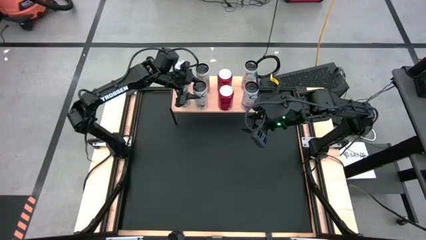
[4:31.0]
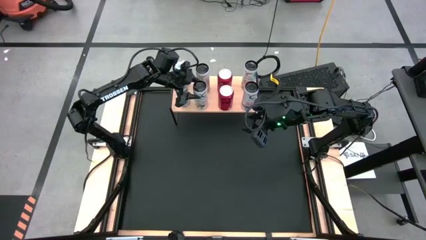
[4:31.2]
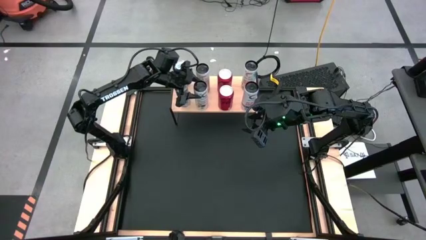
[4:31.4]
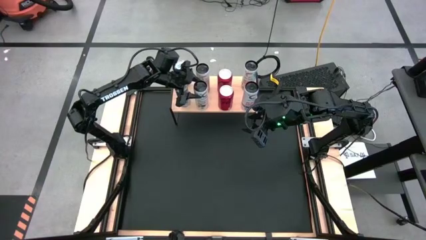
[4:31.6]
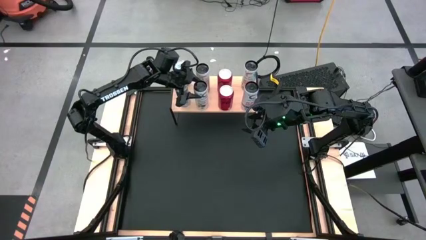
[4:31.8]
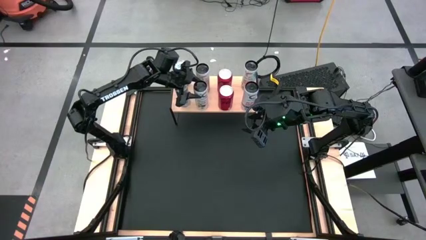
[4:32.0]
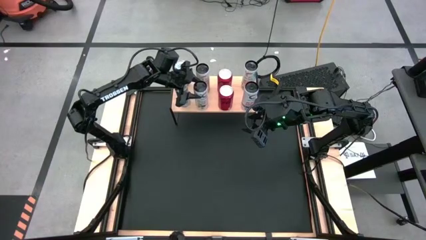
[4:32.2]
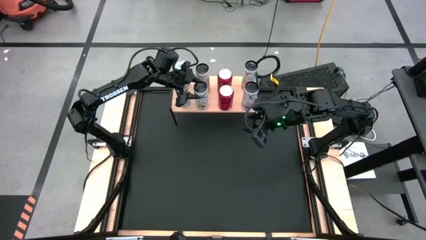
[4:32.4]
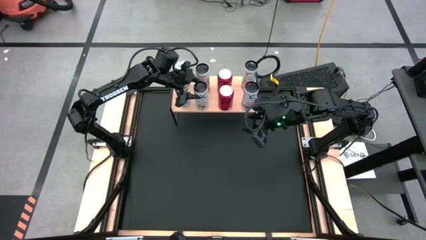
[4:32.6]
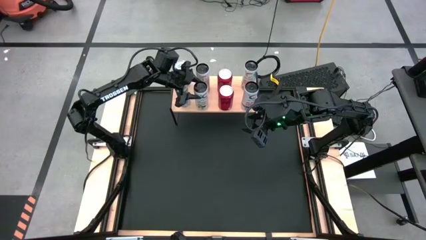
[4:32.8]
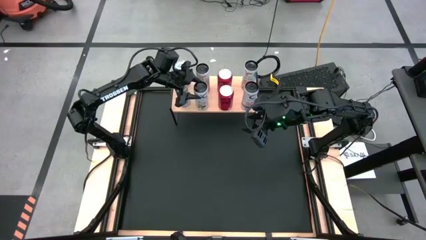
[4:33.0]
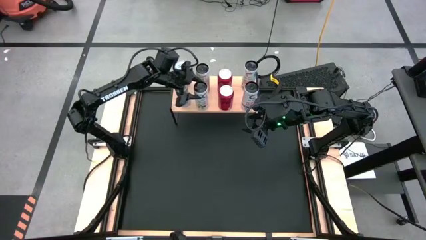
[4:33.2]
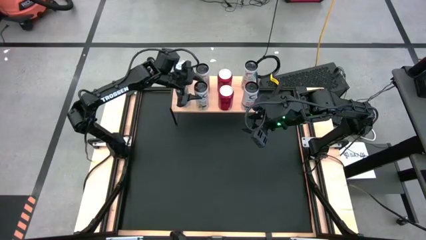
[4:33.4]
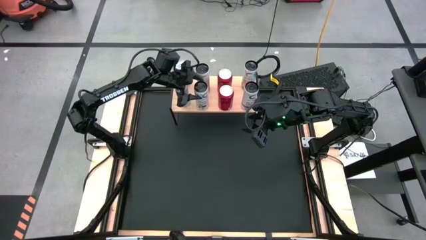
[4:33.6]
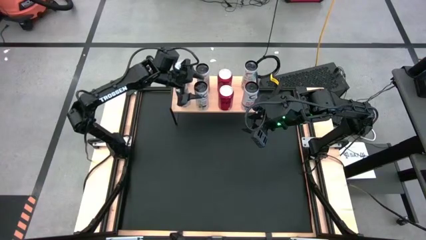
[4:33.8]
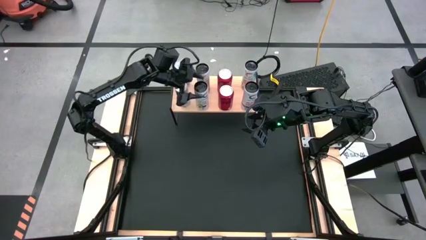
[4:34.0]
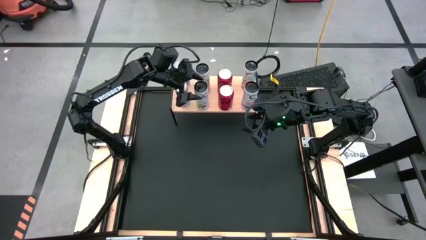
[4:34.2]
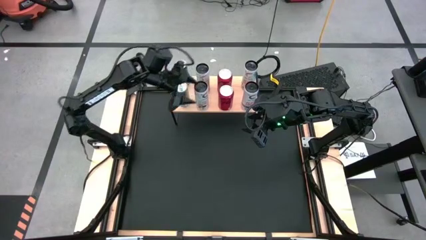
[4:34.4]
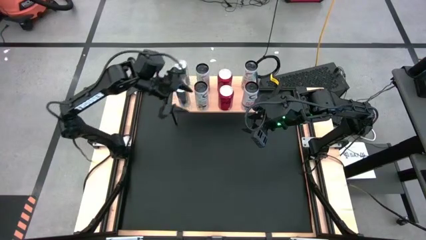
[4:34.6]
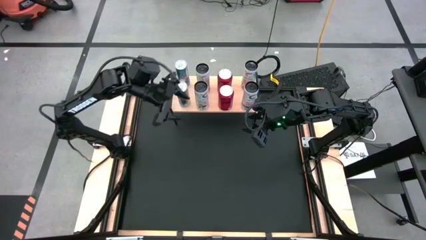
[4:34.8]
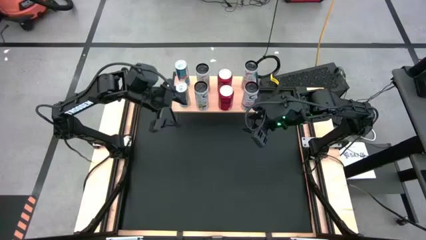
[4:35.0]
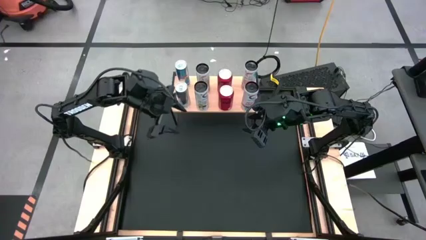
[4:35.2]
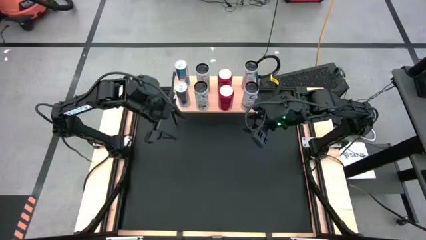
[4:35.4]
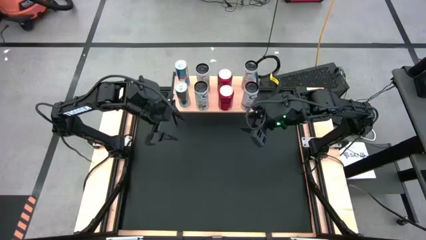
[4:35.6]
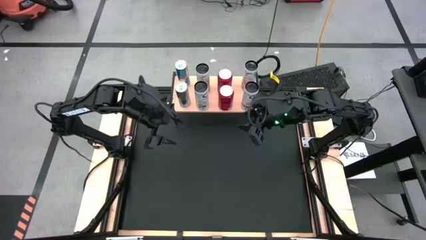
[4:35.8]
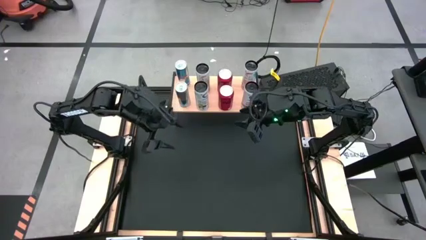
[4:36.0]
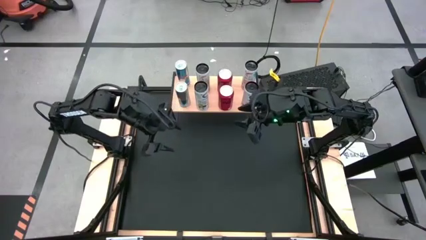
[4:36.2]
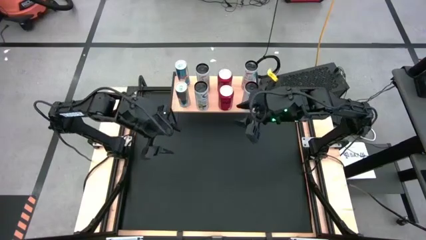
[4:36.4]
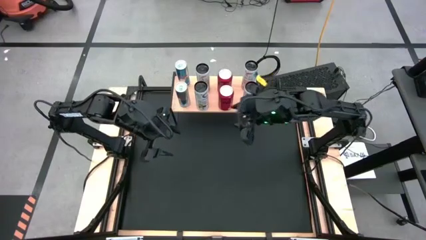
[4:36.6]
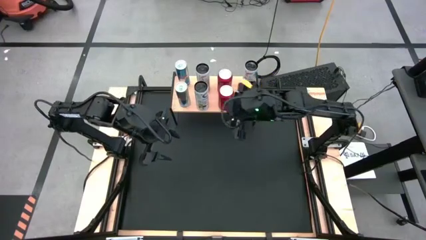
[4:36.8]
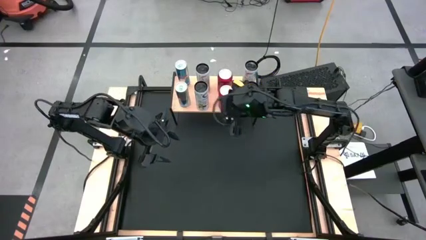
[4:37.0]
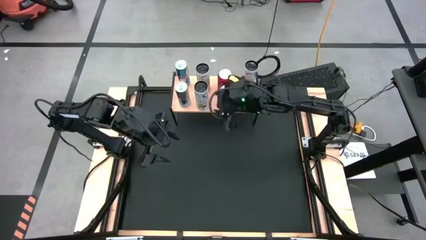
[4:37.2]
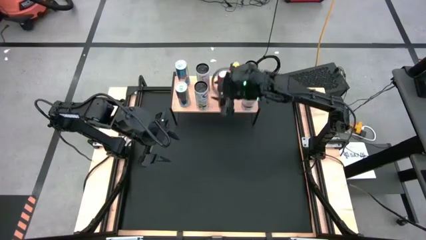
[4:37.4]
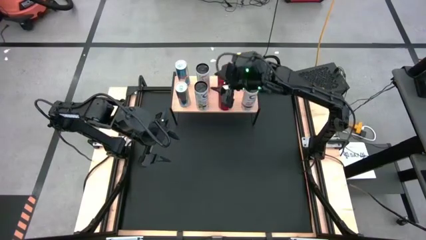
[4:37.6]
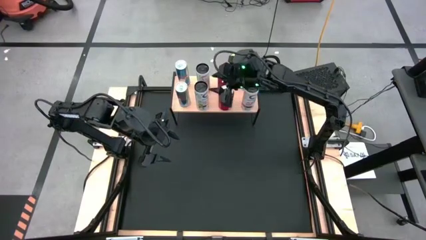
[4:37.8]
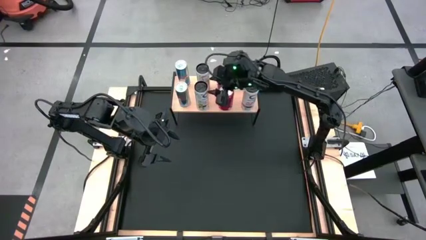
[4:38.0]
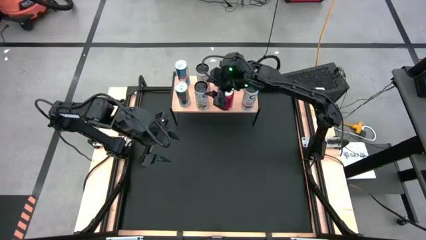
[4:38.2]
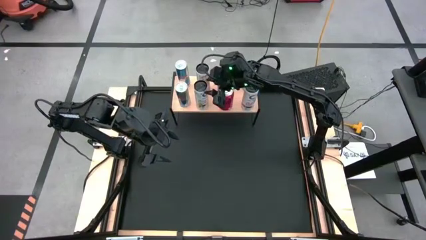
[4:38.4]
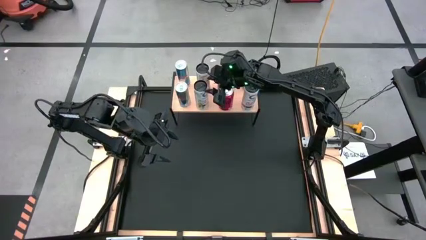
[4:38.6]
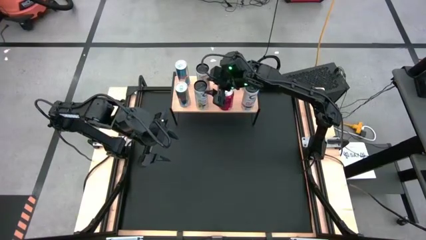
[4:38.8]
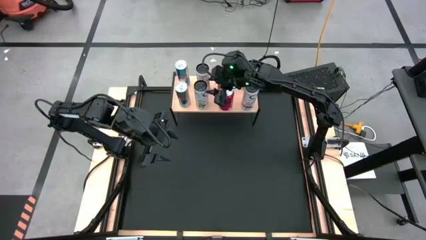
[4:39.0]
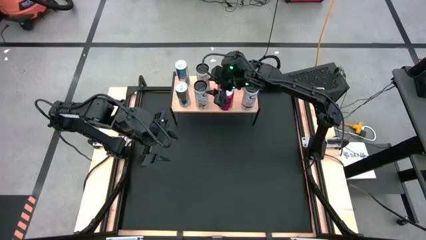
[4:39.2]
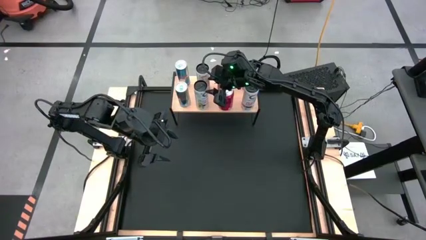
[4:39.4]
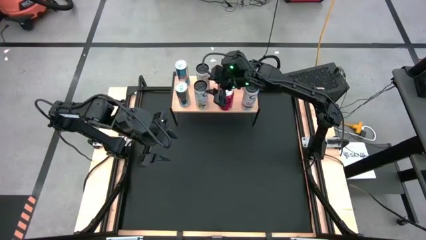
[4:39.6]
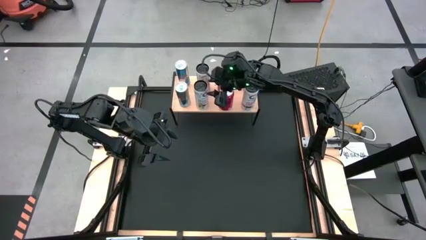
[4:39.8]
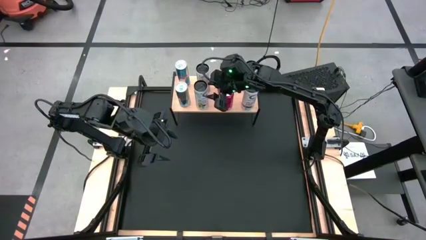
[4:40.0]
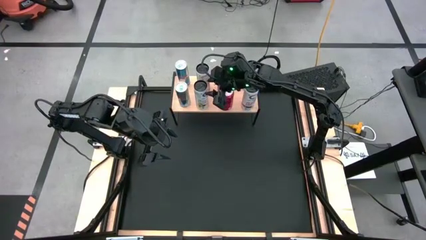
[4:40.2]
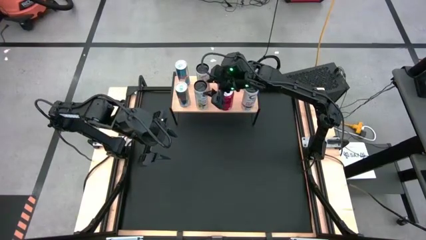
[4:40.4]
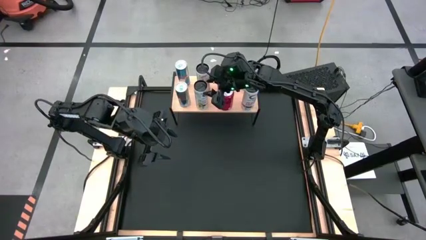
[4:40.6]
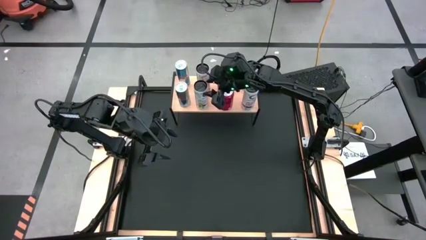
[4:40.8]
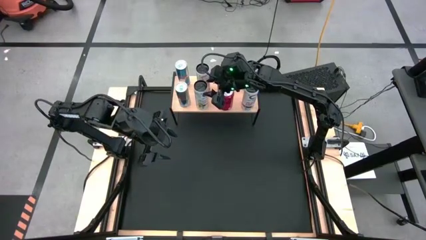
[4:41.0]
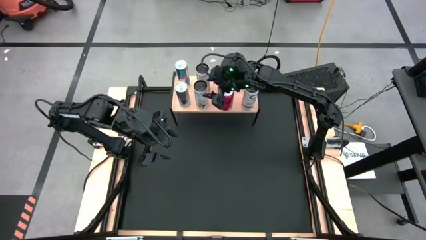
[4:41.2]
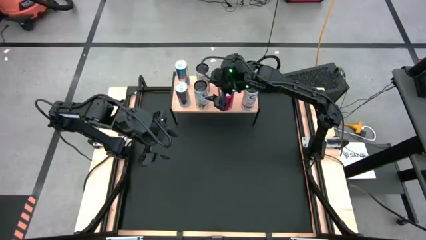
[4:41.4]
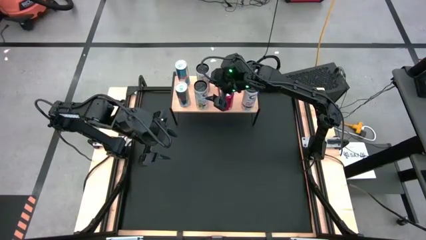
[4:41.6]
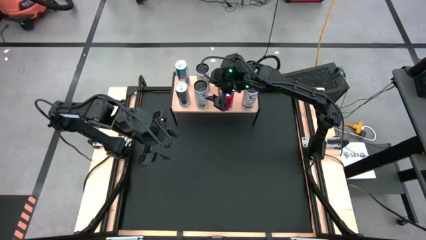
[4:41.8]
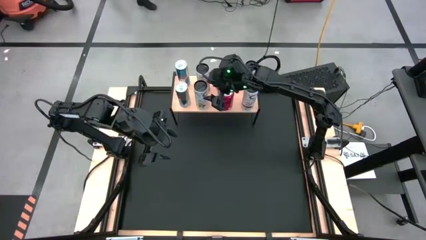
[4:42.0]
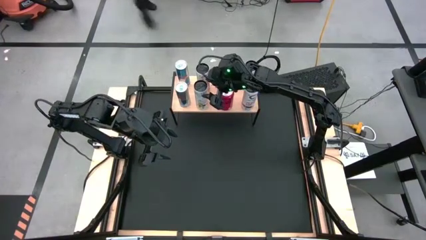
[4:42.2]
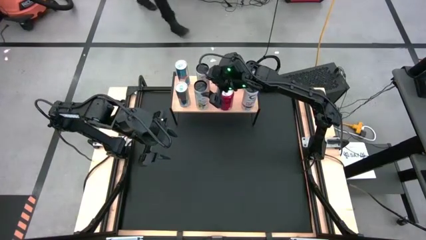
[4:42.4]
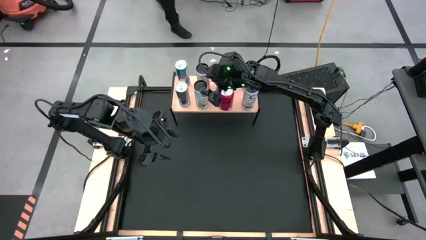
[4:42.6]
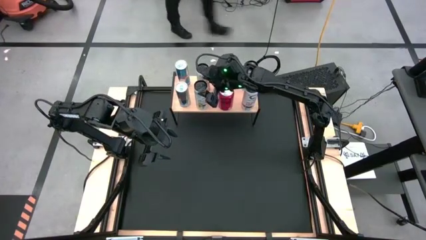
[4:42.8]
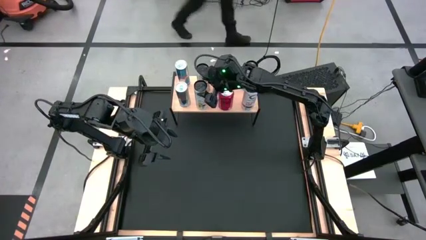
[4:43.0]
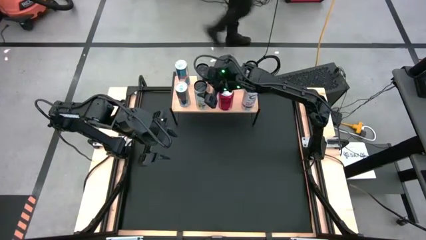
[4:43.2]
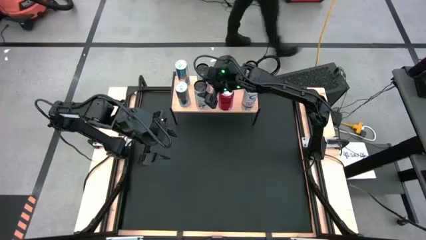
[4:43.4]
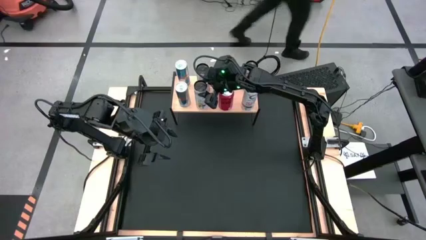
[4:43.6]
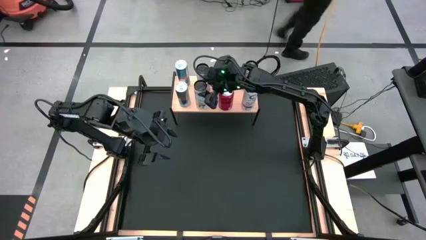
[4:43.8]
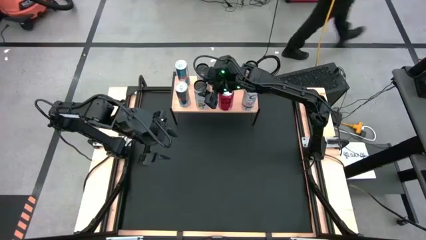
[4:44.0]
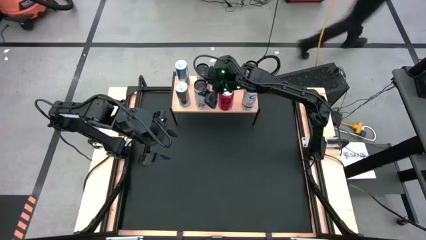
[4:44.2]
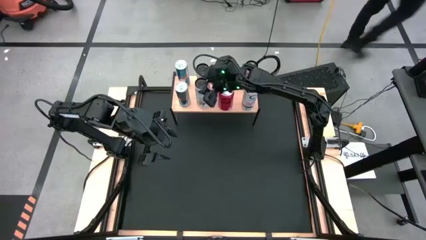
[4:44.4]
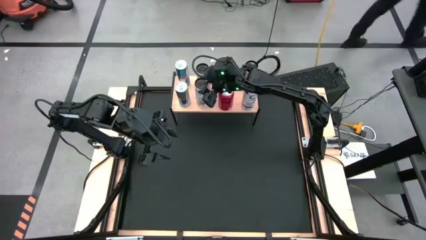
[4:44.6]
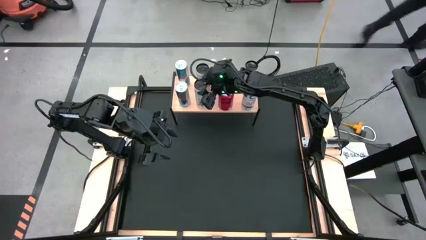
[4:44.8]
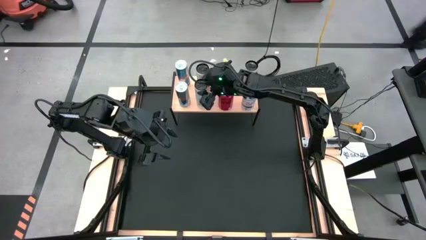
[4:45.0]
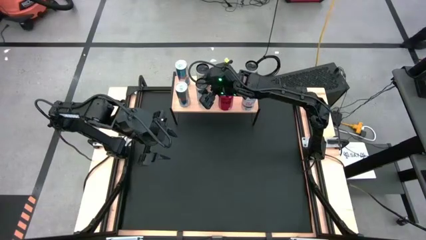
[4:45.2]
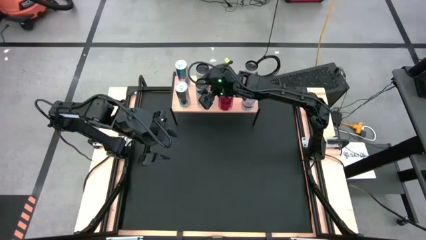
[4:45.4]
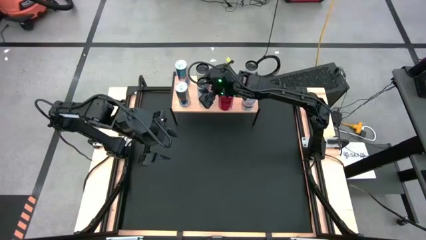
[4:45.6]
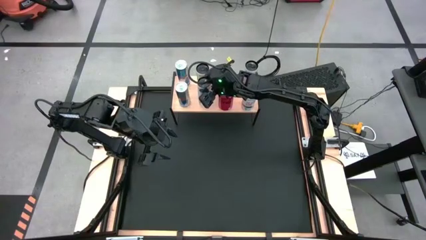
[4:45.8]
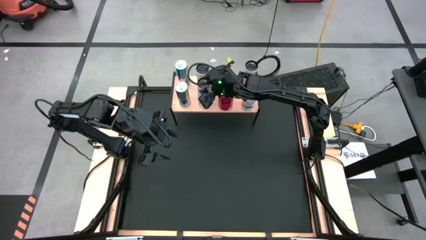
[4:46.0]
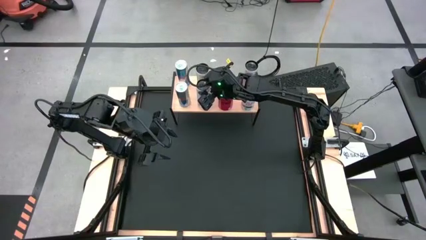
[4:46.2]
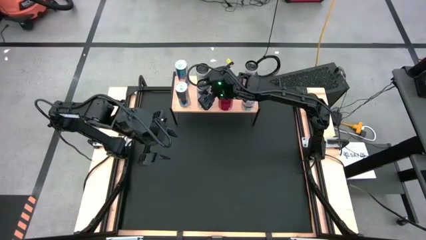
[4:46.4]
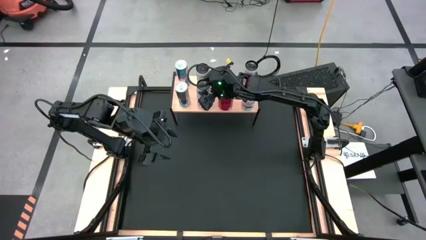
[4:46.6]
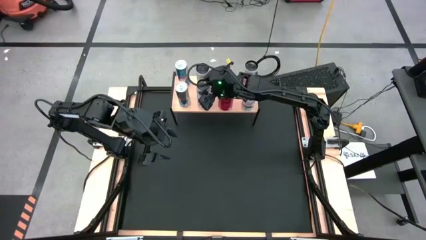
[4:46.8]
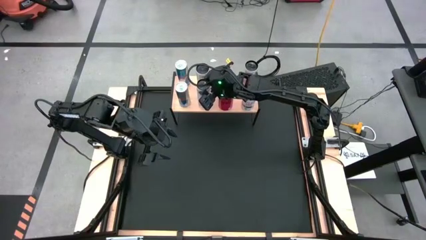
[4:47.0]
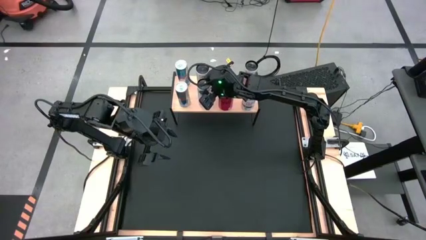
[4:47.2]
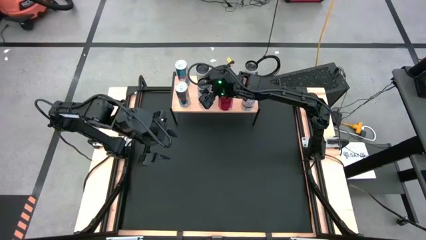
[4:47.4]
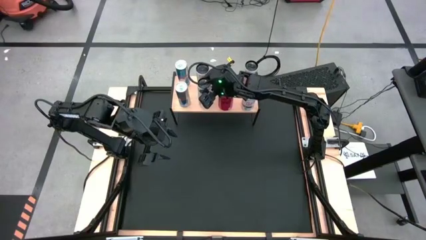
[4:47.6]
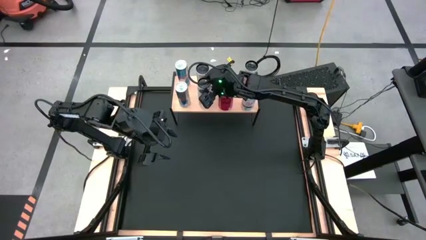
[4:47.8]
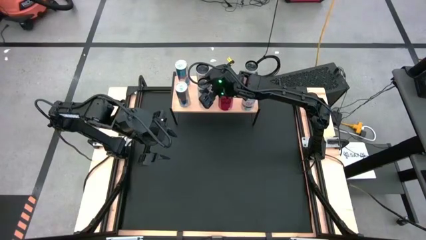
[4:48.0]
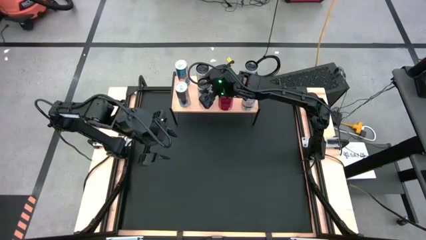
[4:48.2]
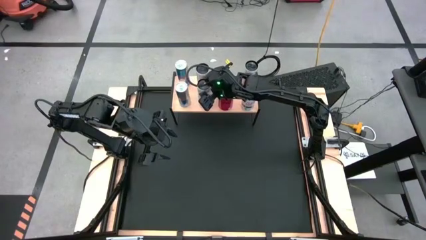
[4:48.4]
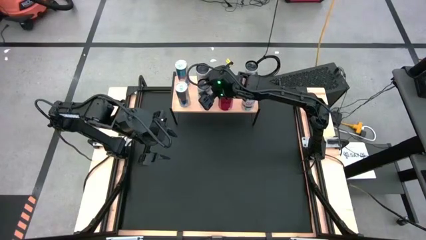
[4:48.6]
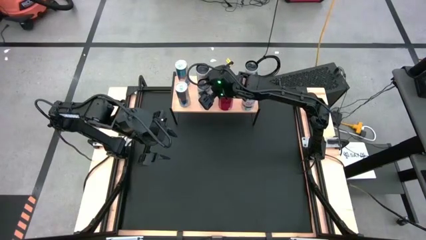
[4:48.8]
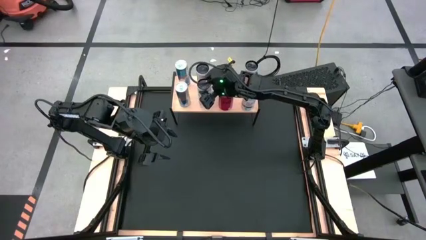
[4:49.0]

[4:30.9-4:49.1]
Task: Place canned beverage on shelf
Put the white orange soda can on the shelf aligned with the other white orange soda can
